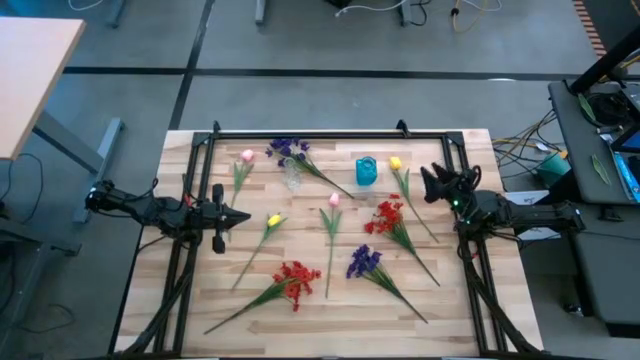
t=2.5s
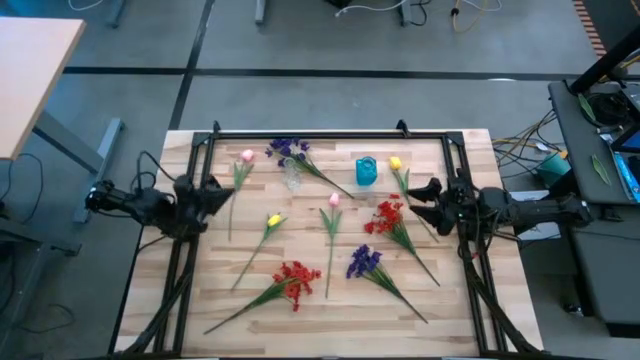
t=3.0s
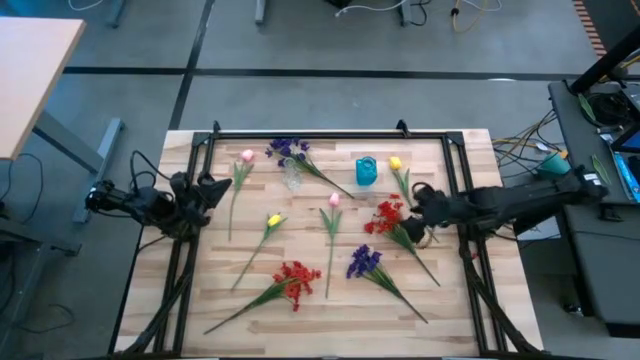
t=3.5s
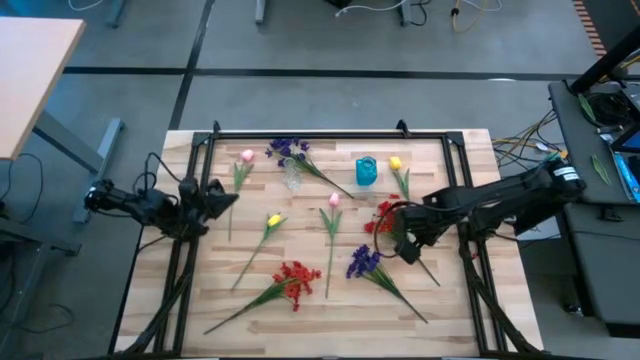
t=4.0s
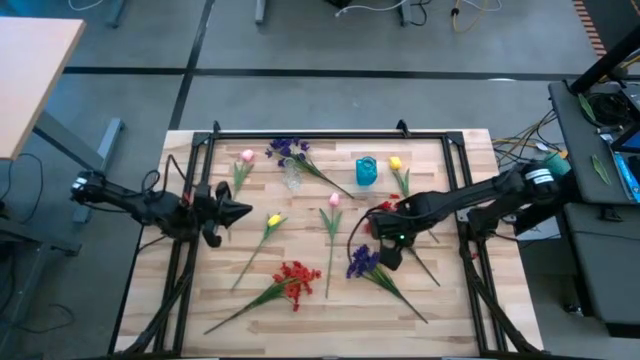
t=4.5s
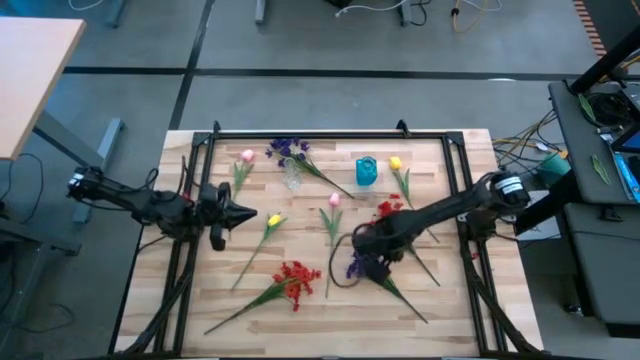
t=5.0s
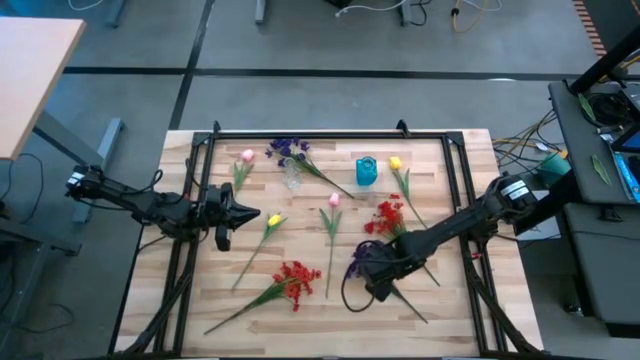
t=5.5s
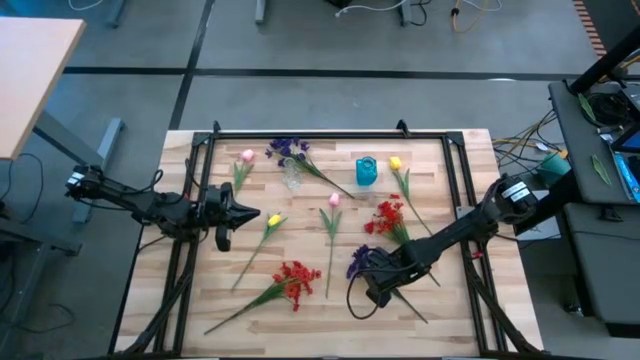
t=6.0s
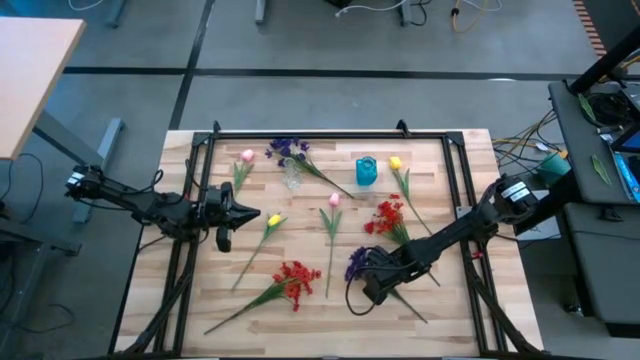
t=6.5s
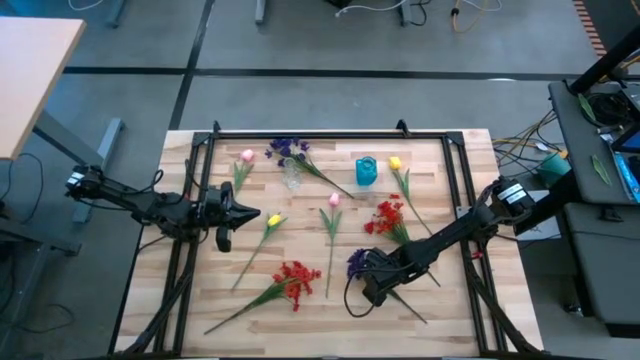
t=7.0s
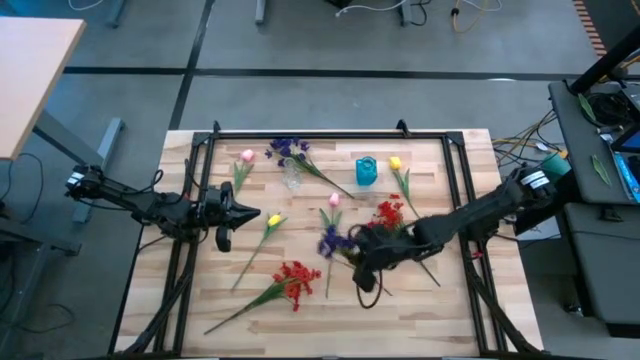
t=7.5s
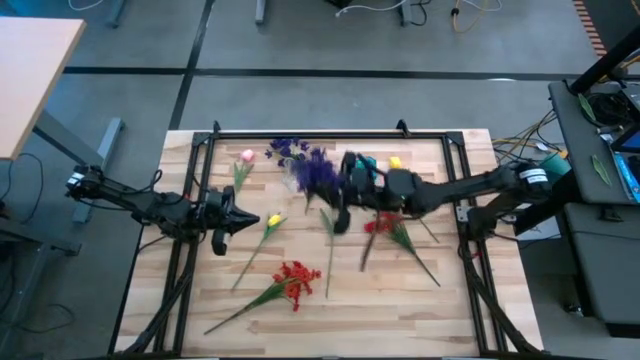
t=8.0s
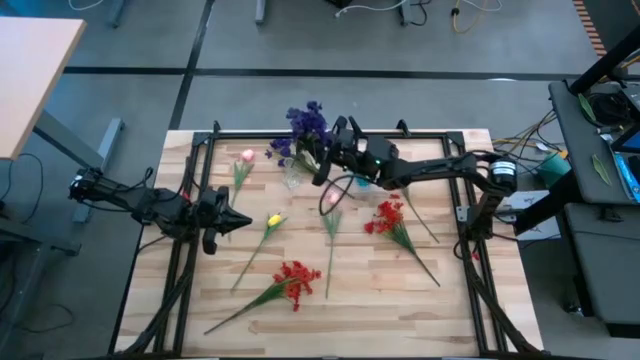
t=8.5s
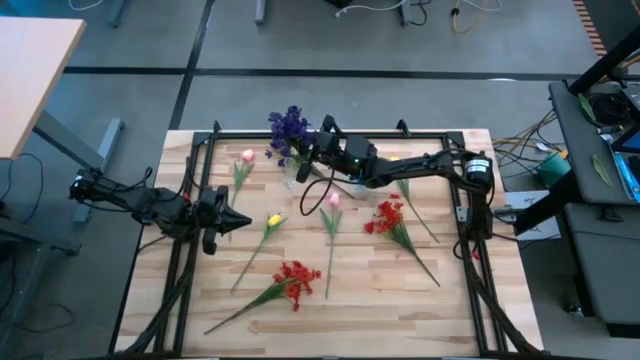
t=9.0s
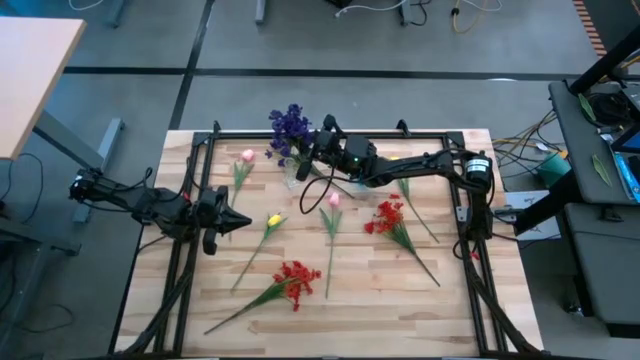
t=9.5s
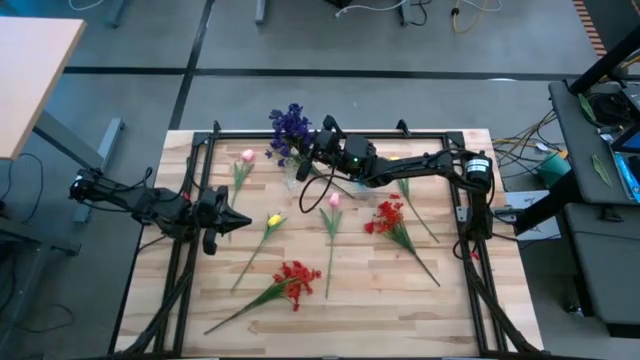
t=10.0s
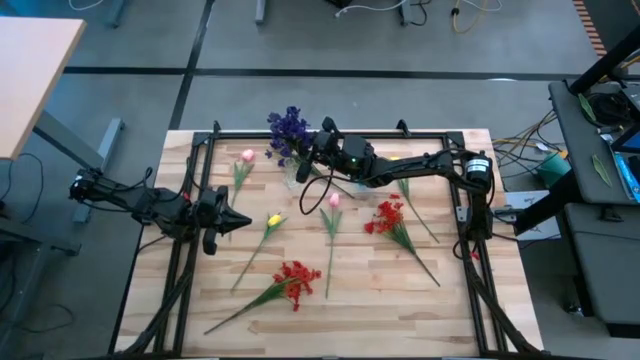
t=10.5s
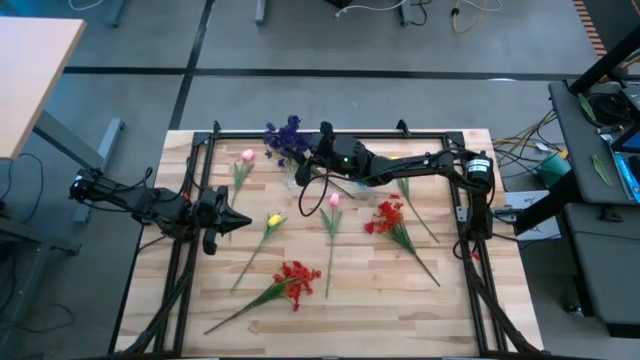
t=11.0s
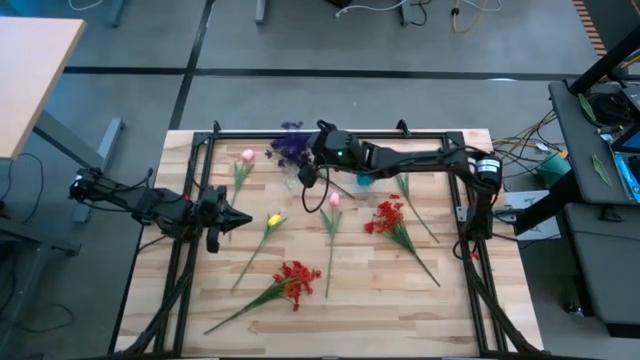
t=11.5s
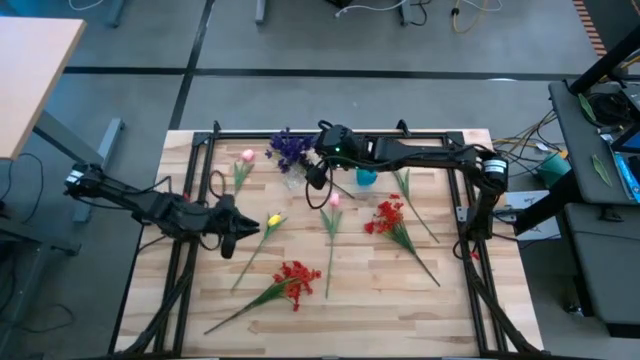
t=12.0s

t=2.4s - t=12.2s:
Task: Sort flowers into vase by color
Put the bottom violet flowers into the transparent vase

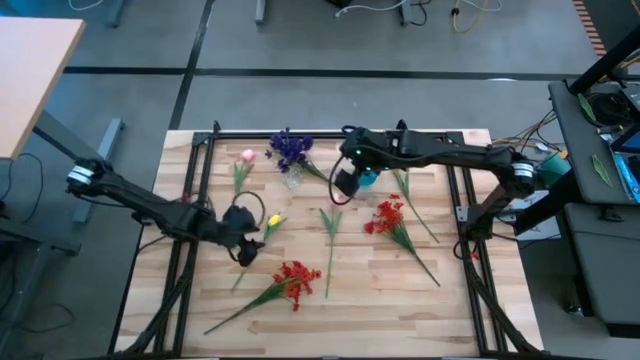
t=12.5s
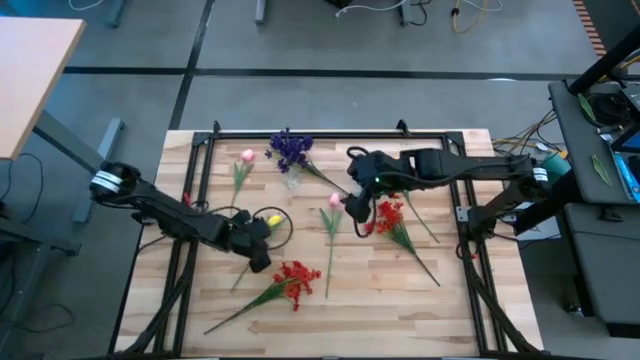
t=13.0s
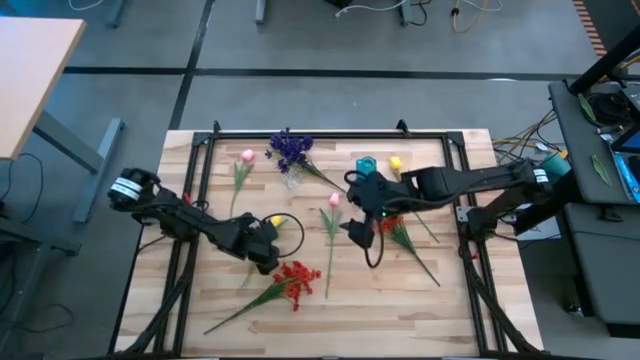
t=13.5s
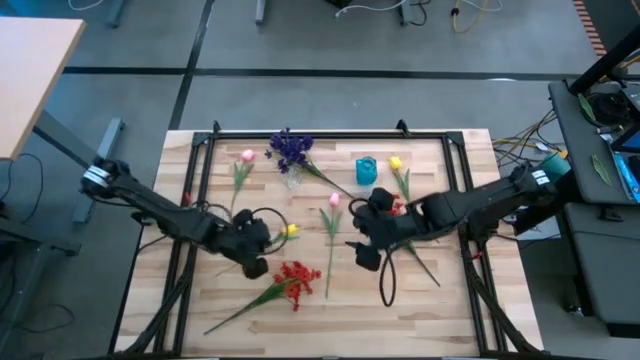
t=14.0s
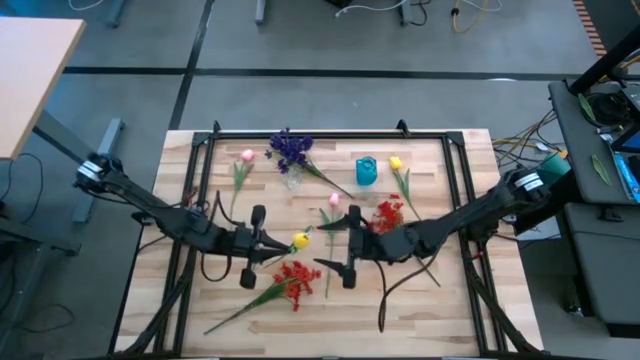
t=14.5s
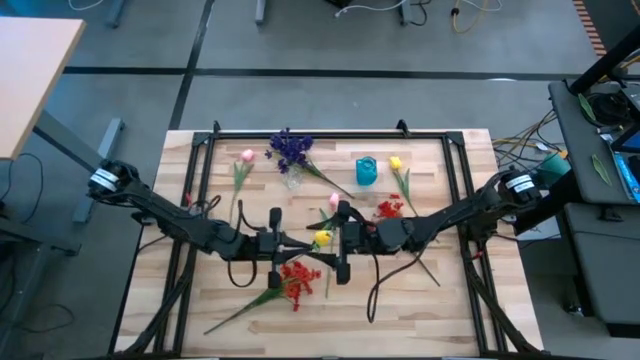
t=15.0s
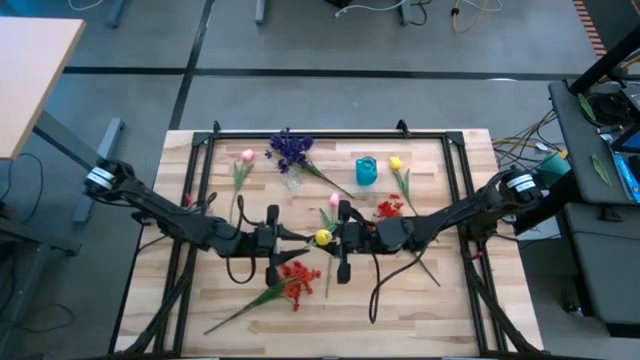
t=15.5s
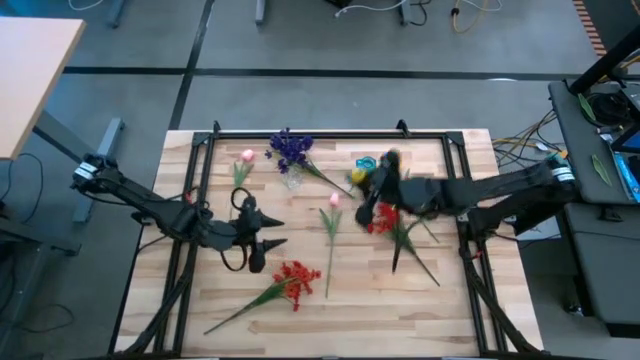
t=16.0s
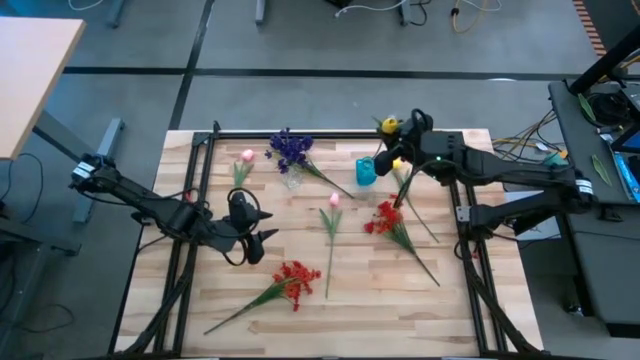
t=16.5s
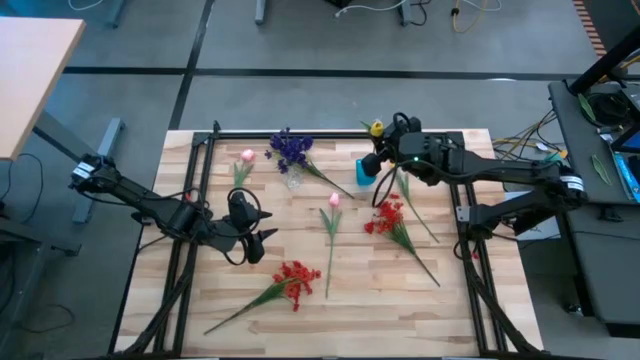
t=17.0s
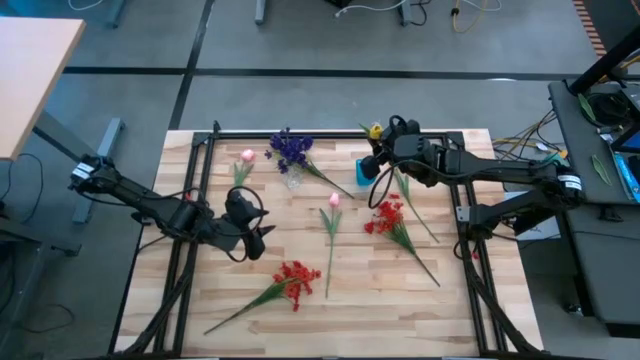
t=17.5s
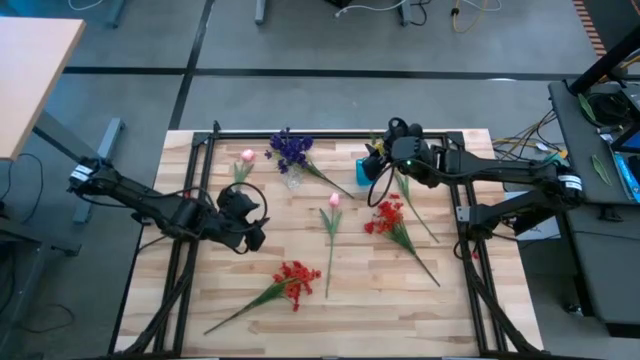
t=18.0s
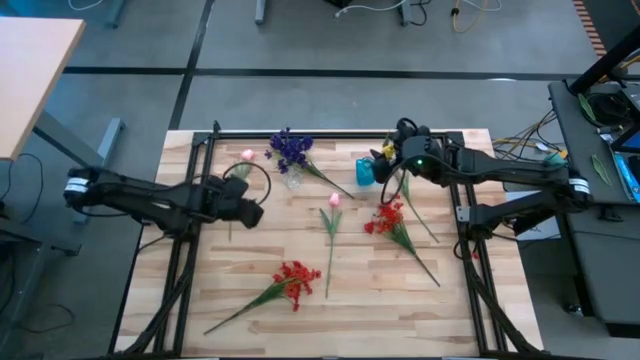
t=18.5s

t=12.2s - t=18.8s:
Put the bottom yellow flower into the blue vase

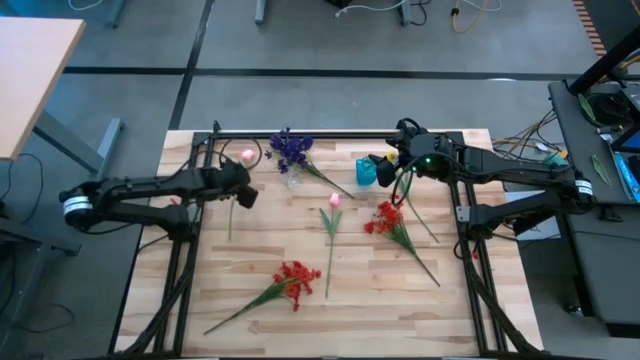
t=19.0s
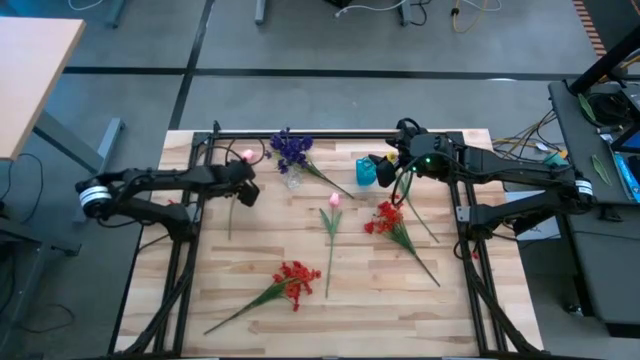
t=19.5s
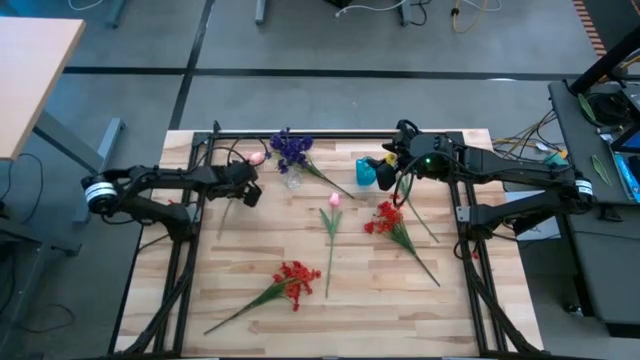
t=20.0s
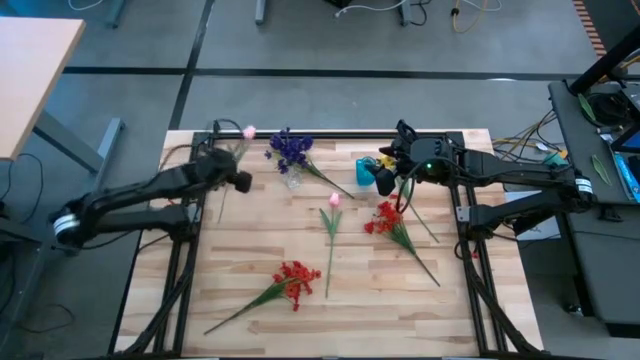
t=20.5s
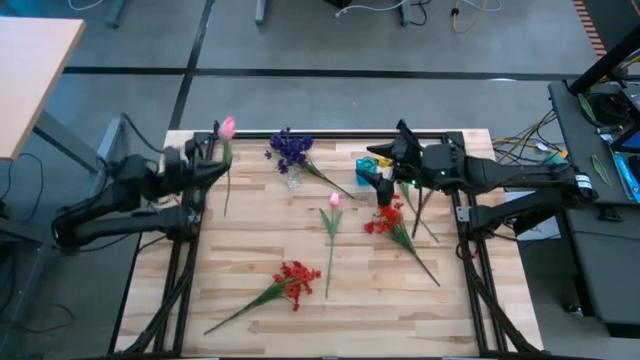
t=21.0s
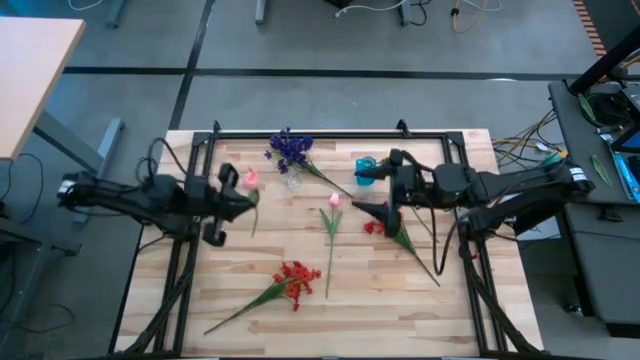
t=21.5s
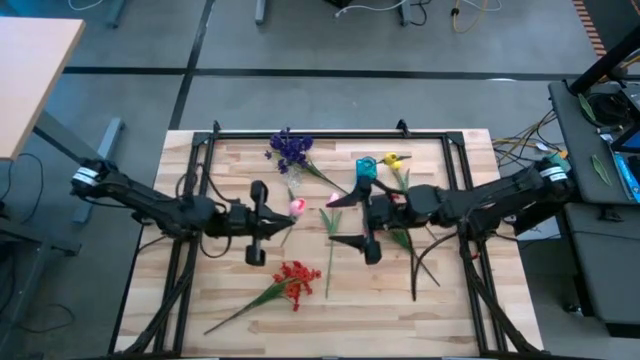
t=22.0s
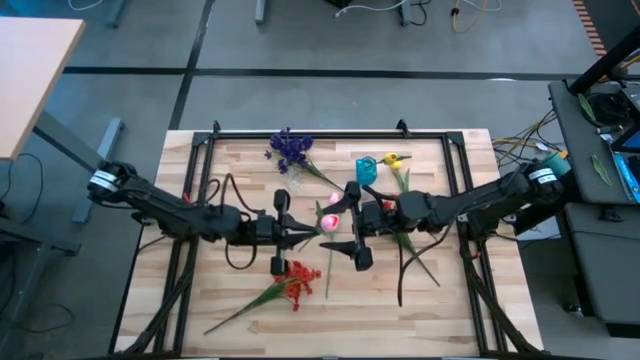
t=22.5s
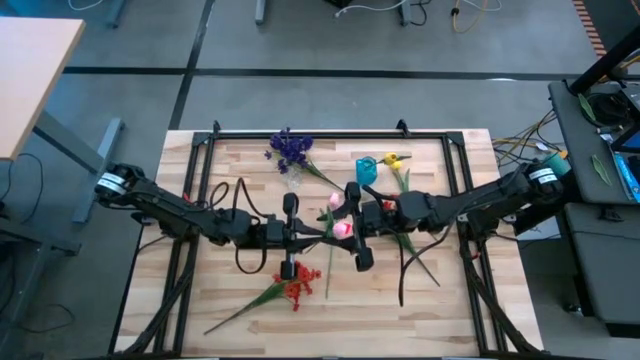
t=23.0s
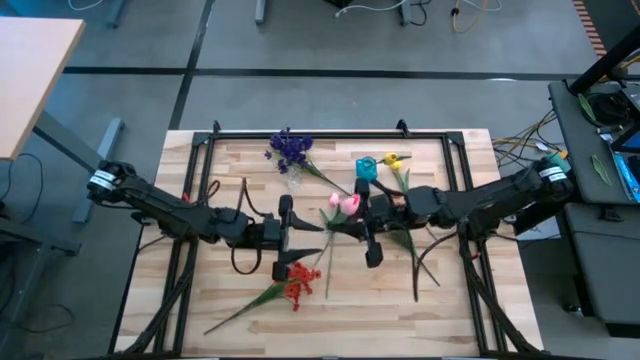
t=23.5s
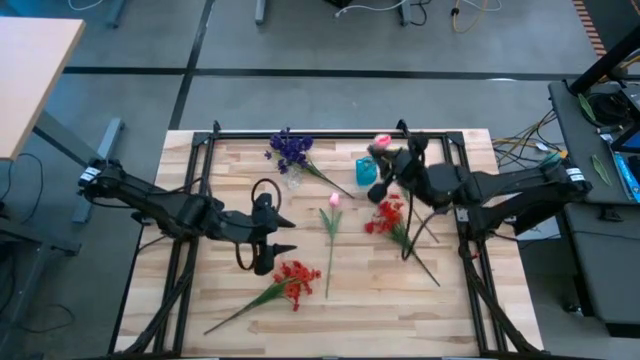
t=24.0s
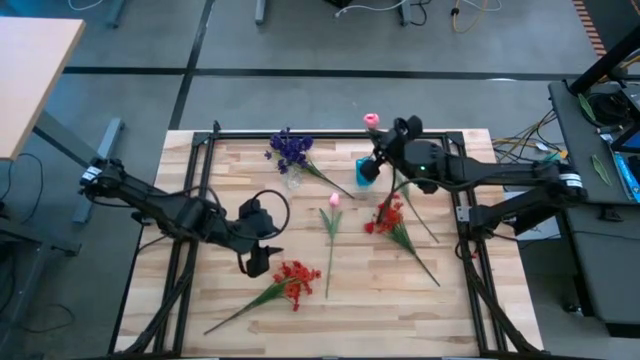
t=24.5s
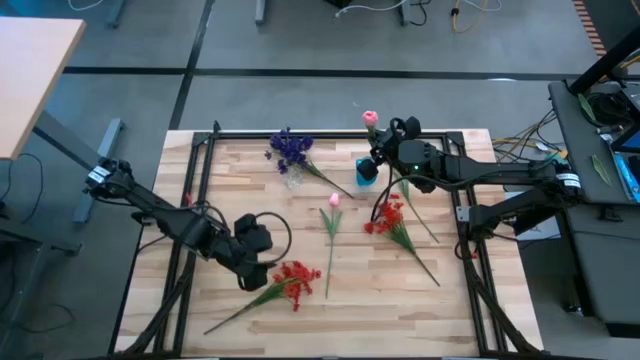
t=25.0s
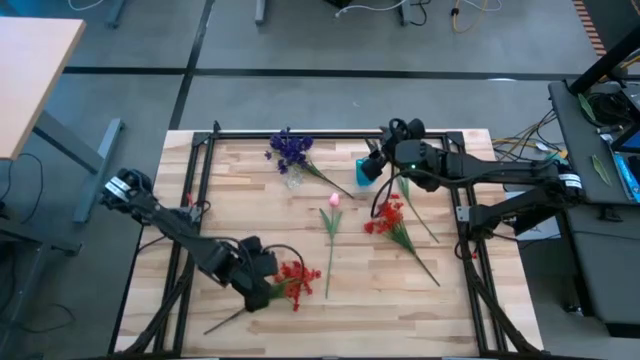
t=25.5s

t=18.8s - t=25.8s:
Put the top pink flower into the blue vase
